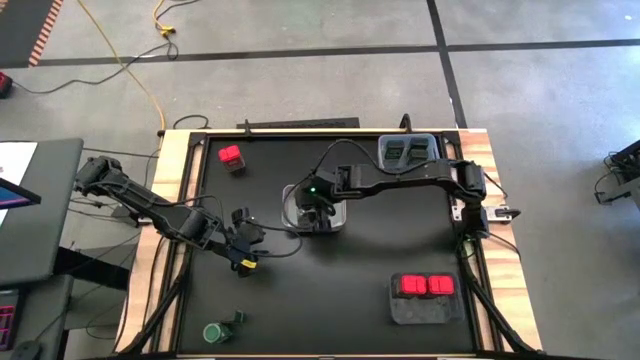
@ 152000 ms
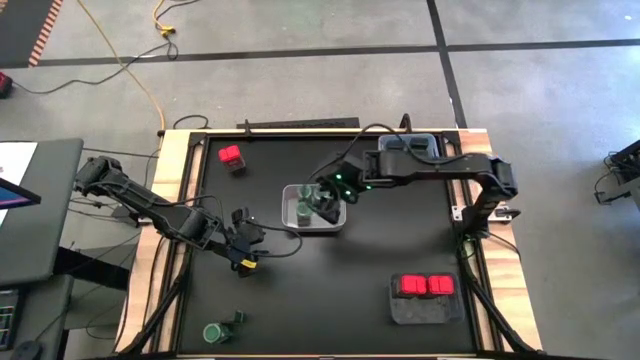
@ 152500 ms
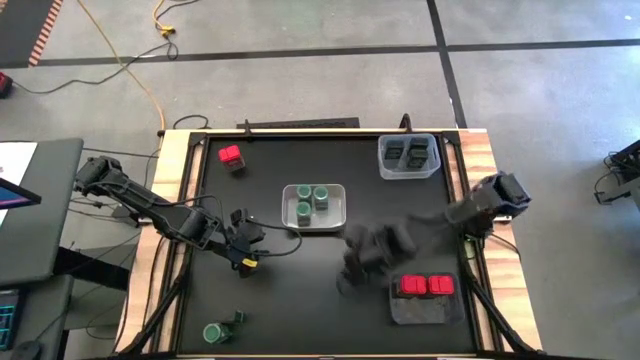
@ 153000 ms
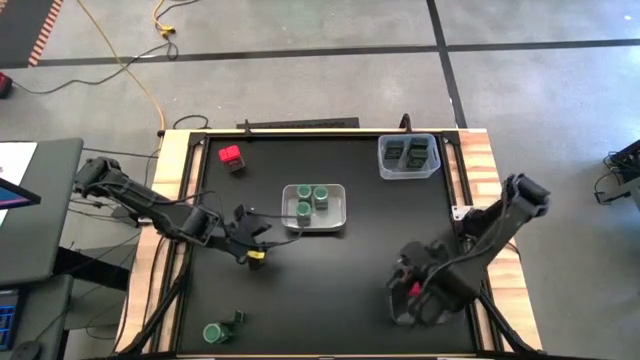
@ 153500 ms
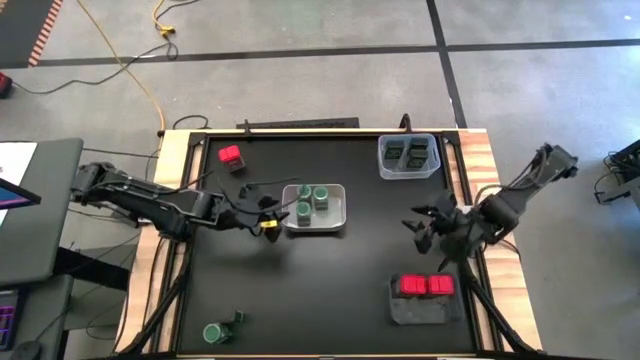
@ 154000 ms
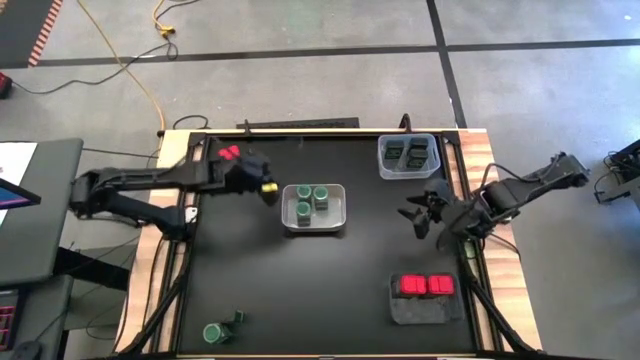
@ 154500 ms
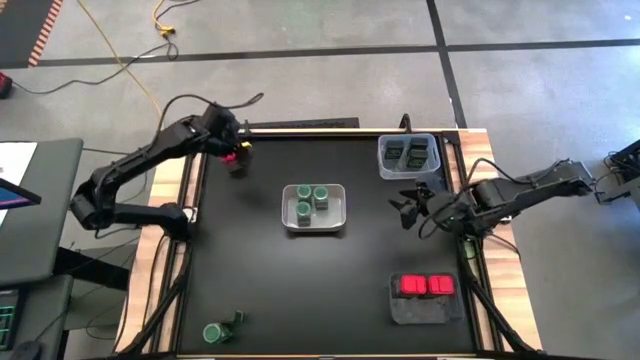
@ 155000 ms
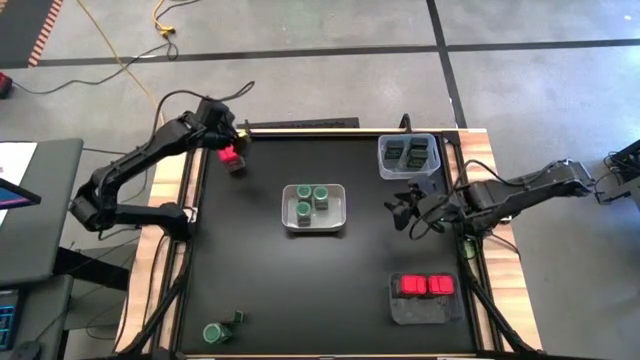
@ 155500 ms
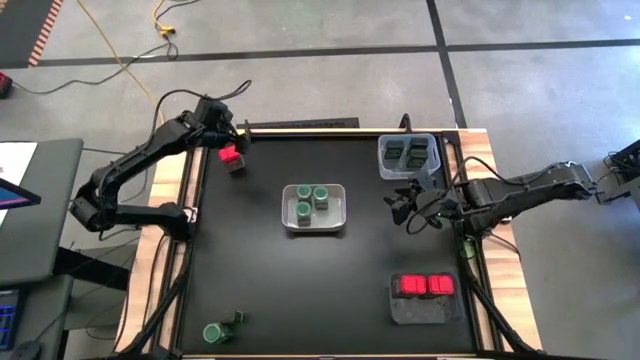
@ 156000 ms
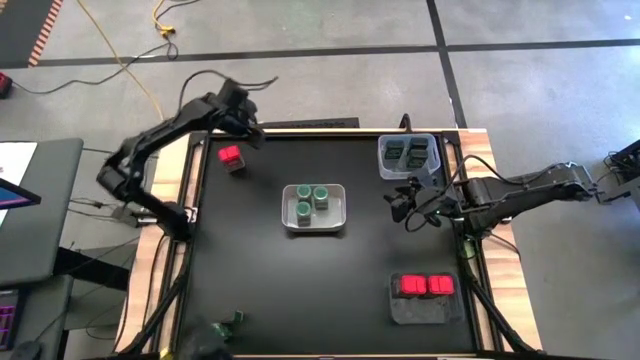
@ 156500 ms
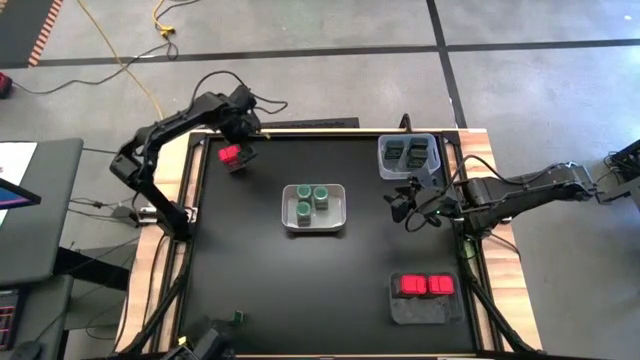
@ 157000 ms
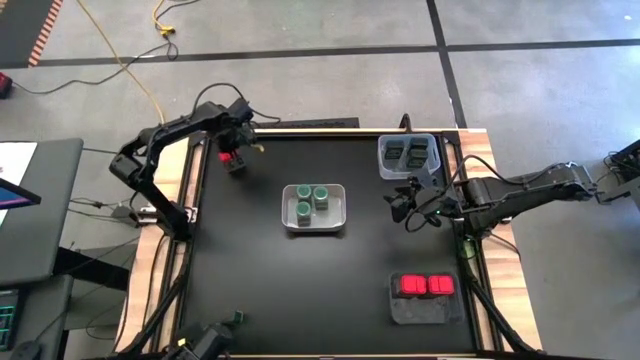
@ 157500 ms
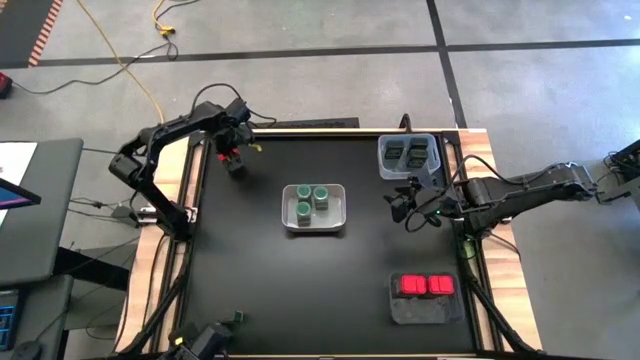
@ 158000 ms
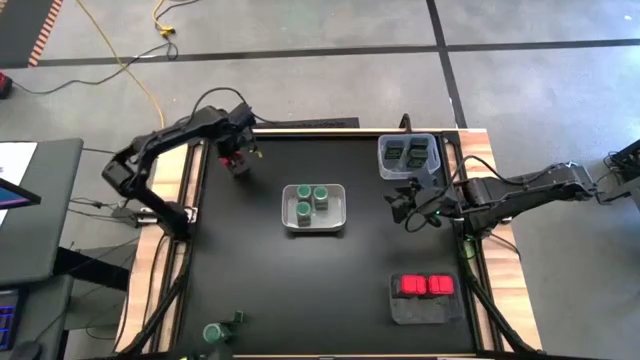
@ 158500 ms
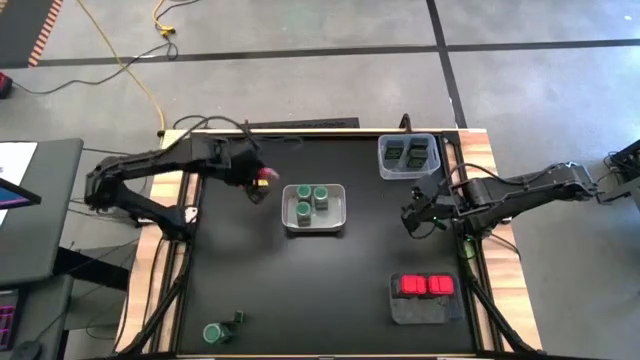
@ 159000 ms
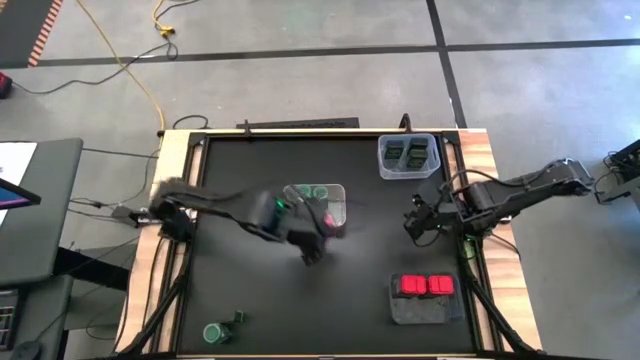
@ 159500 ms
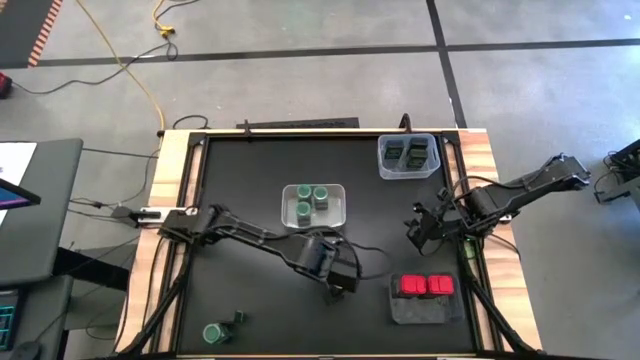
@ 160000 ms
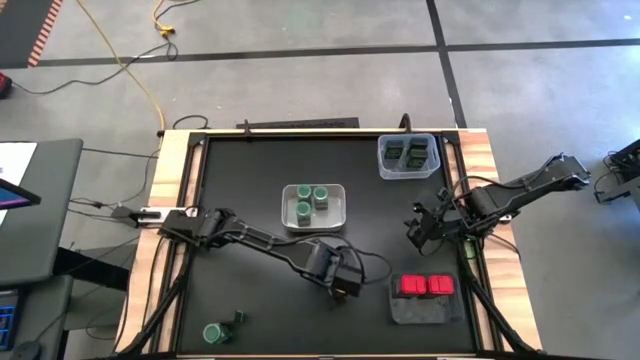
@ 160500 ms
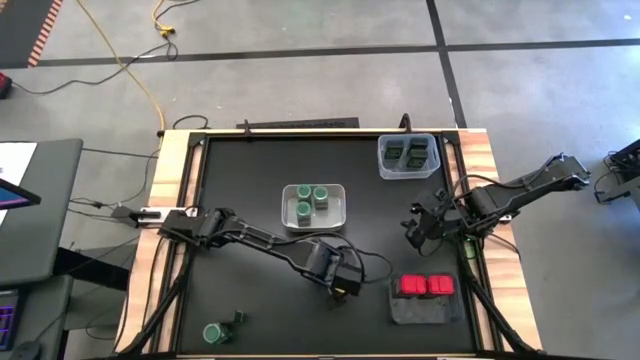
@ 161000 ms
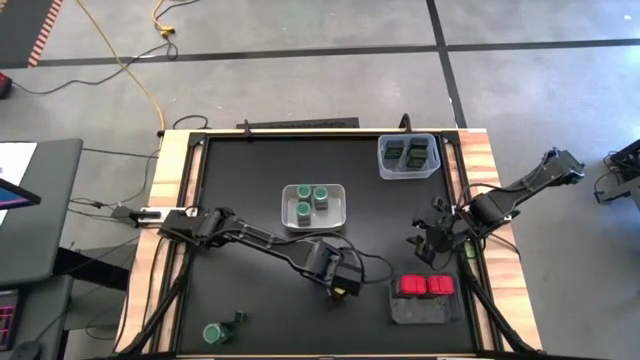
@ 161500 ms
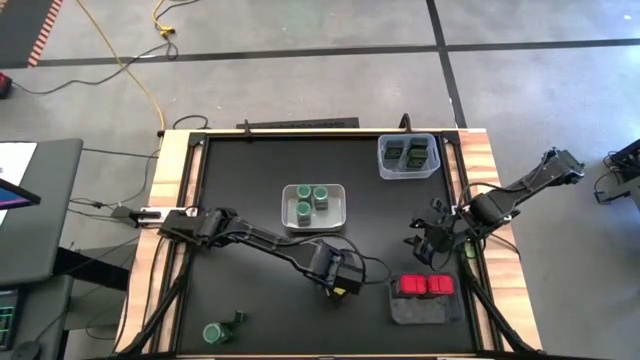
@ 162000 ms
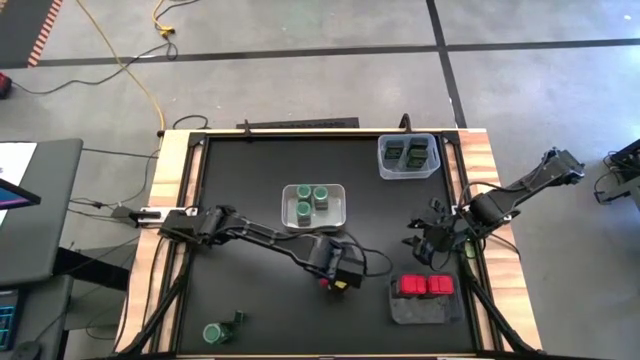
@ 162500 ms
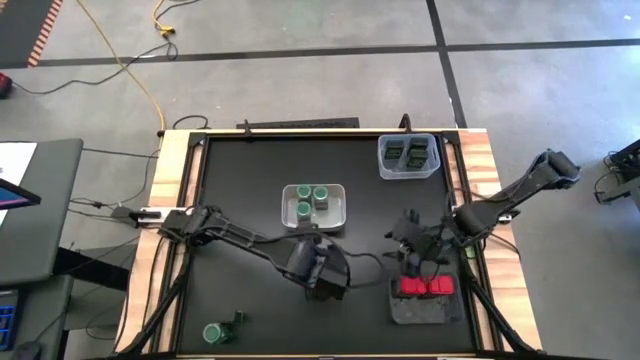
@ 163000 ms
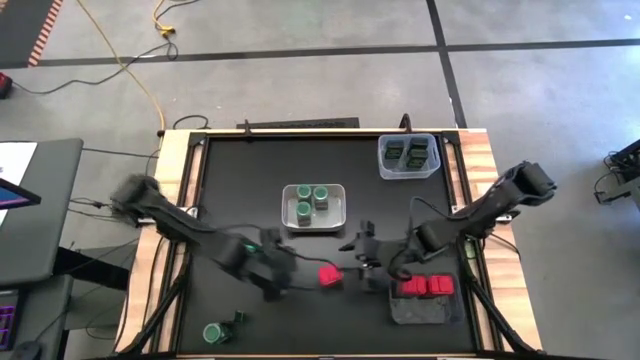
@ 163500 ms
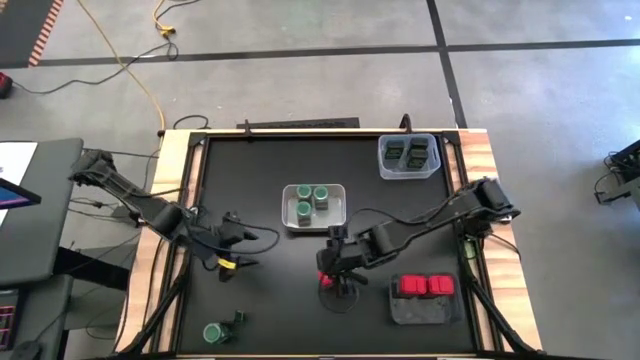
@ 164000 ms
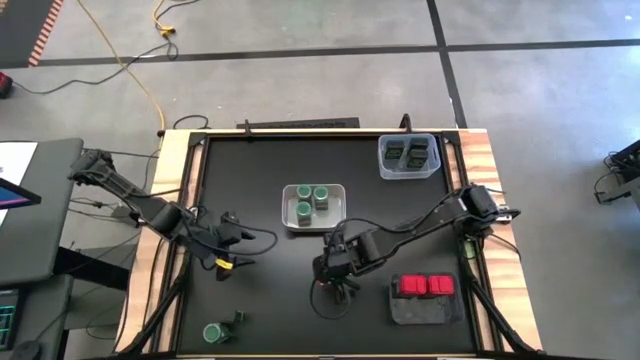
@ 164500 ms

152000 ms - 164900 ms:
Task: Sort spices by type
Put the red seasoning can into the black bin

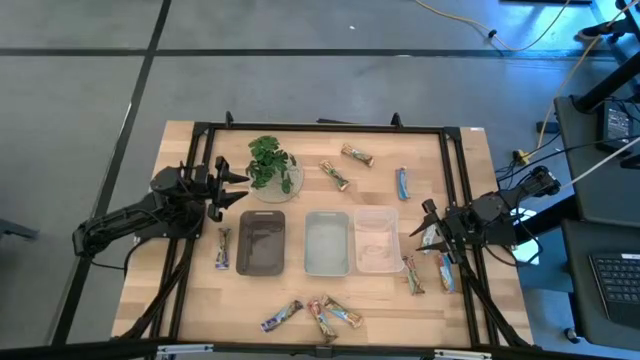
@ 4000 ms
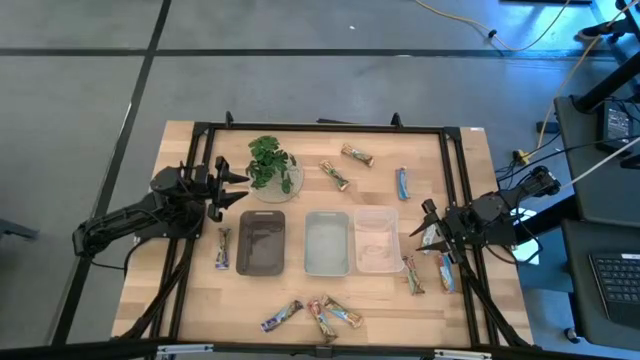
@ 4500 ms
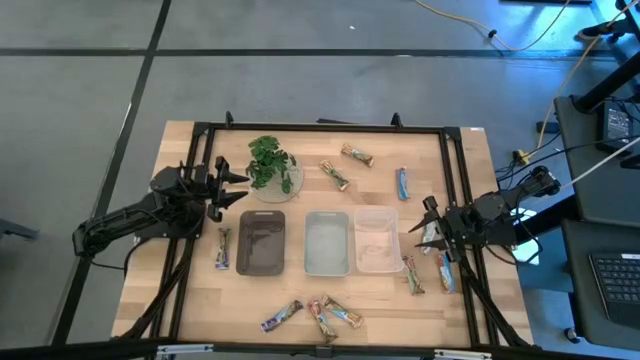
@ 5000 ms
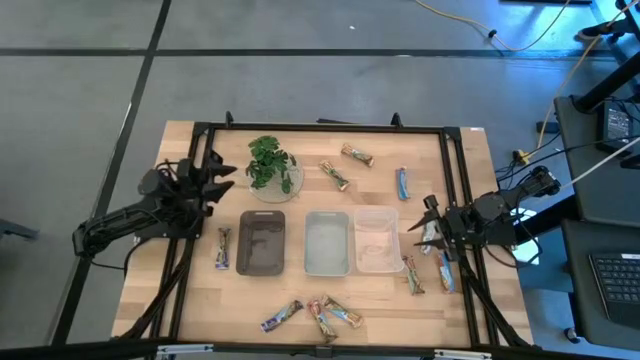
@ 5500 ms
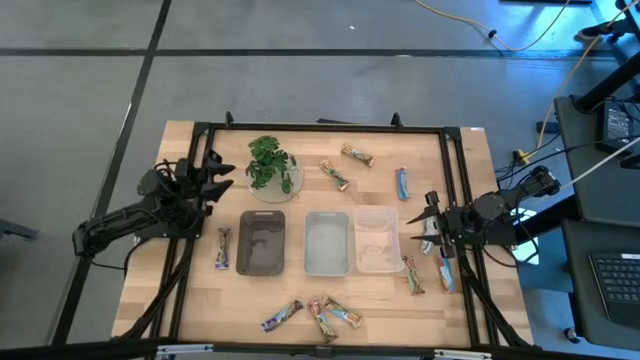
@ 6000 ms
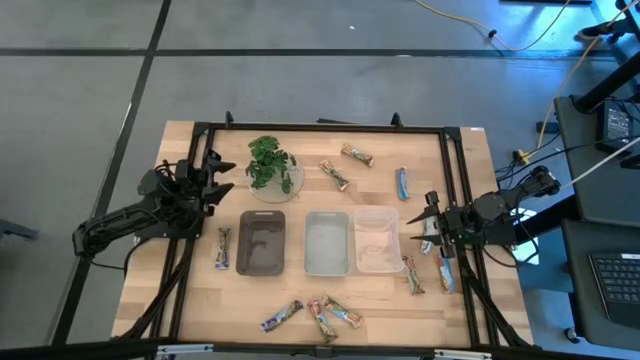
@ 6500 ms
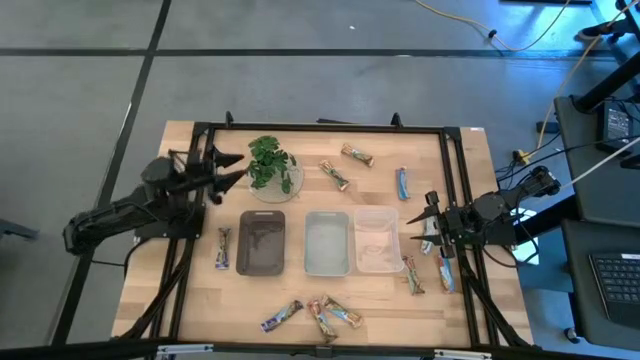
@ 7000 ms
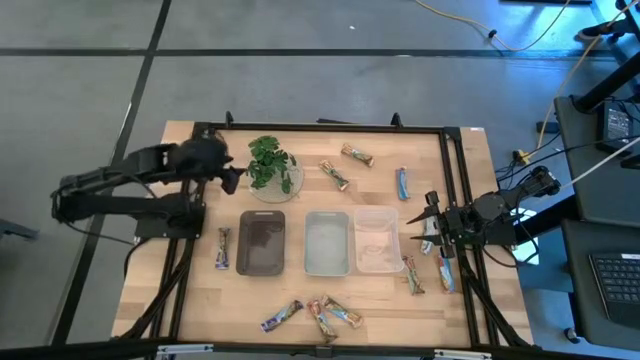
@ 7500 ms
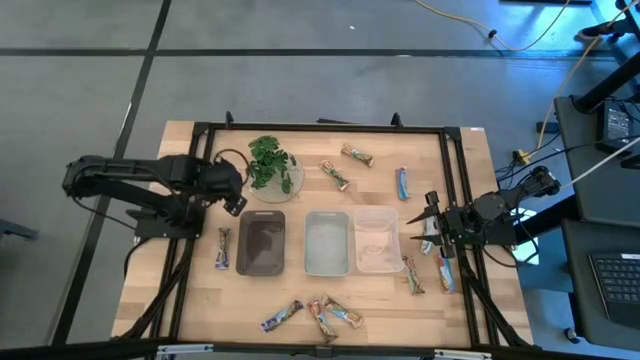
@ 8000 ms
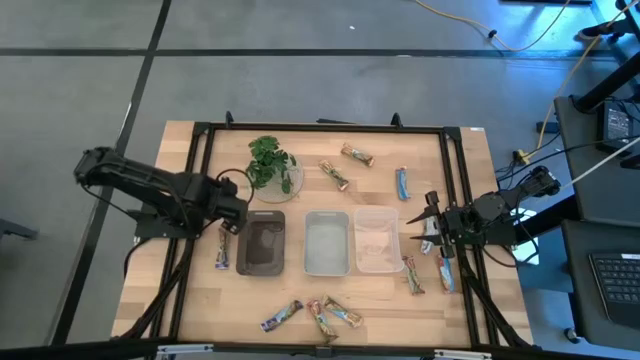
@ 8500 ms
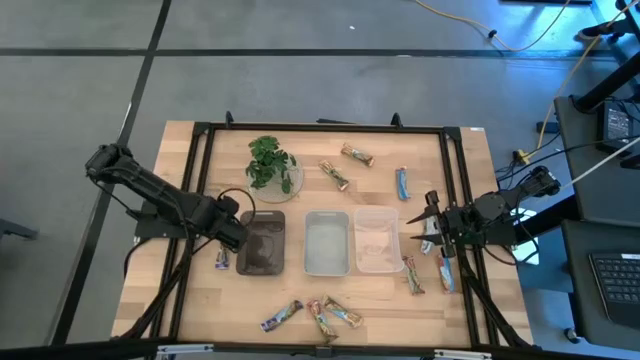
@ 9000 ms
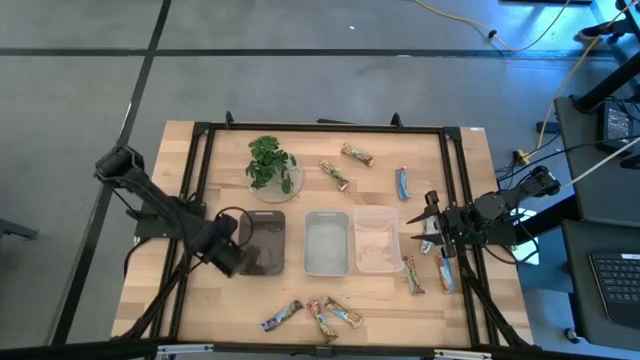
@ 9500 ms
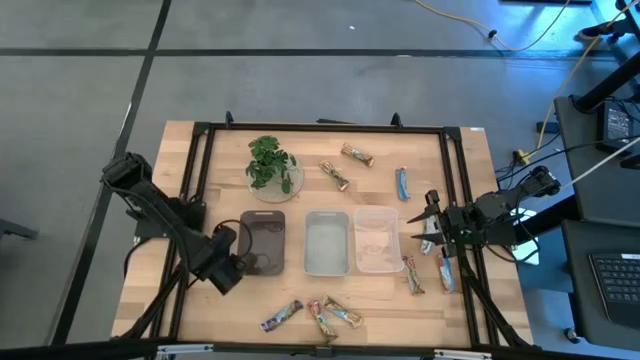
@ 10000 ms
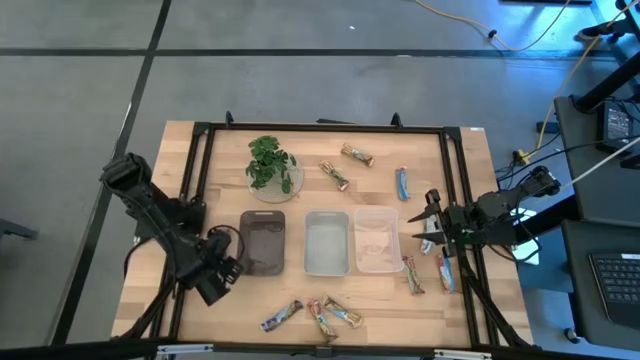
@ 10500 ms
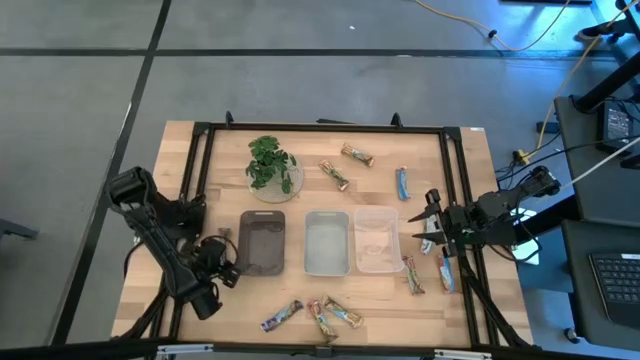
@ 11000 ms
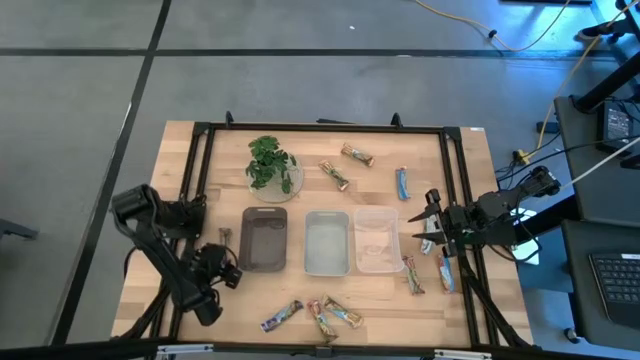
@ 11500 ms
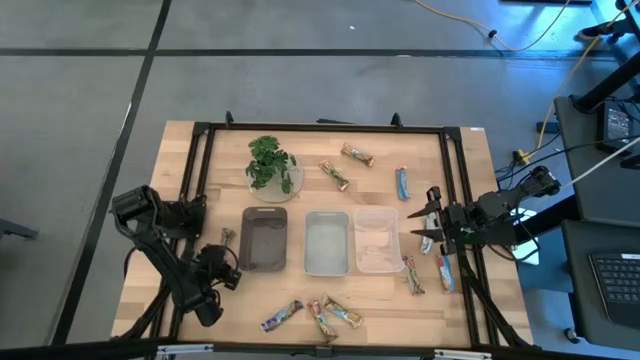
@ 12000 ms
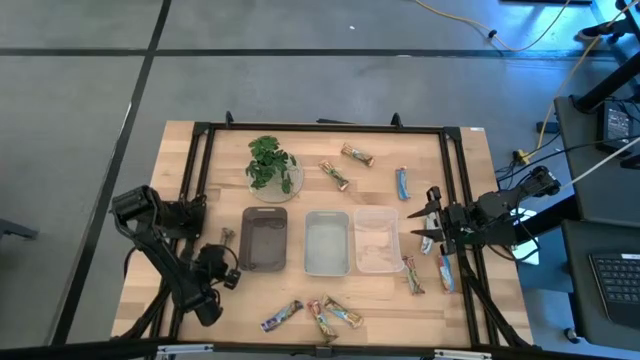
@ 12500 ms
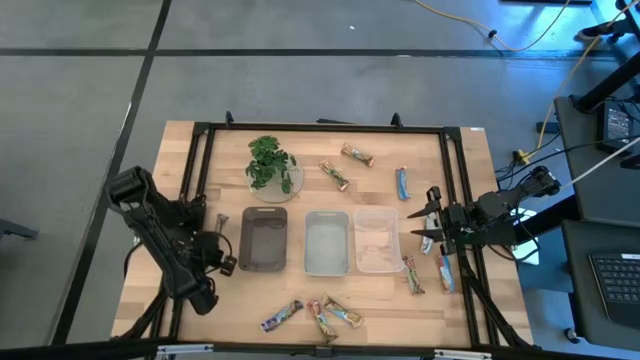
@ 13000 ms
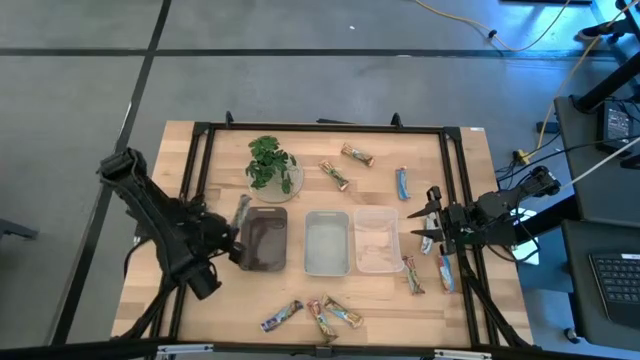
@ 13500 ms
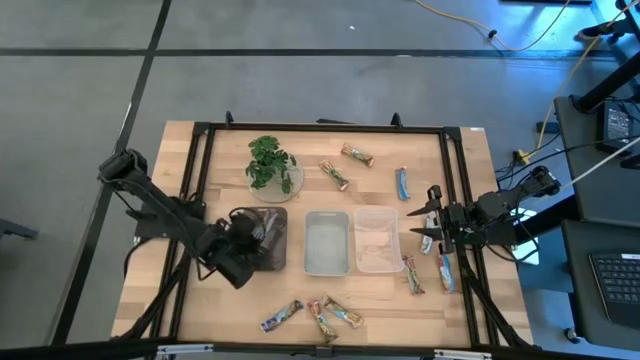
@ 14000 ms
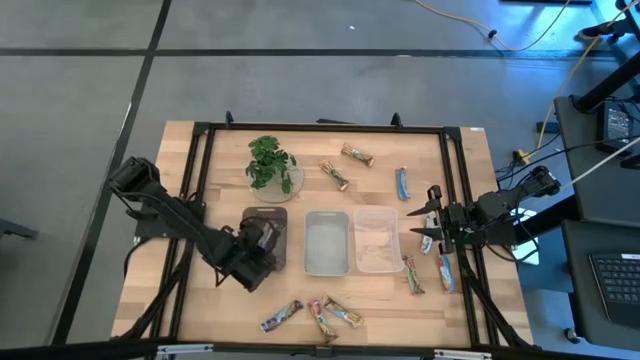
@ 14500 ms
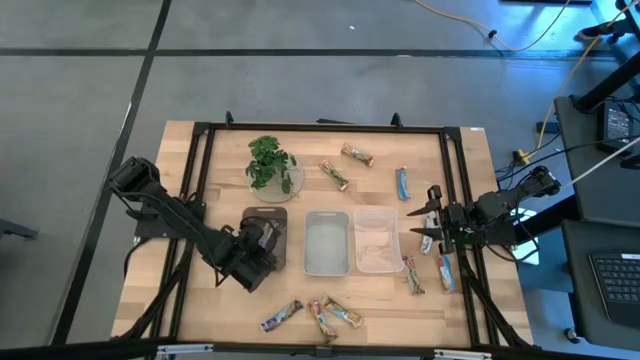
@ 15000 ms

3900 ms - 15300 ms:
Task: Pick and place Granola Bars by type
Put the top blue granola bar into the black bin
